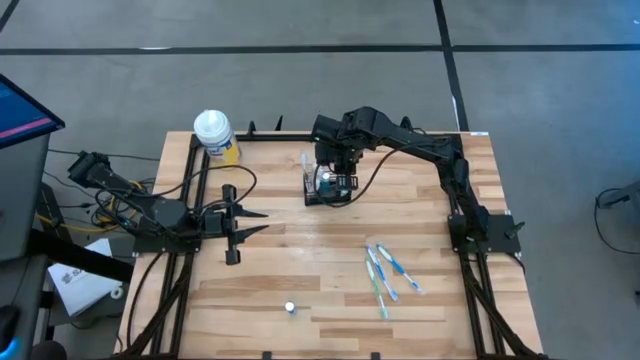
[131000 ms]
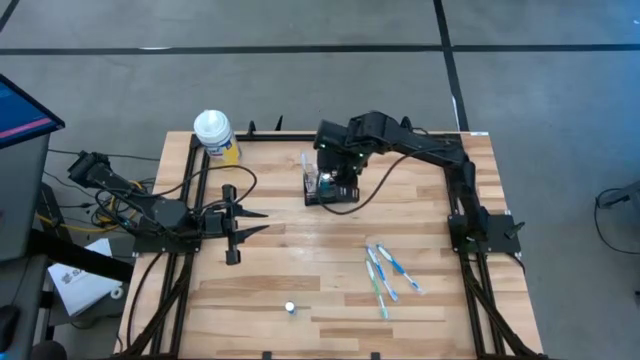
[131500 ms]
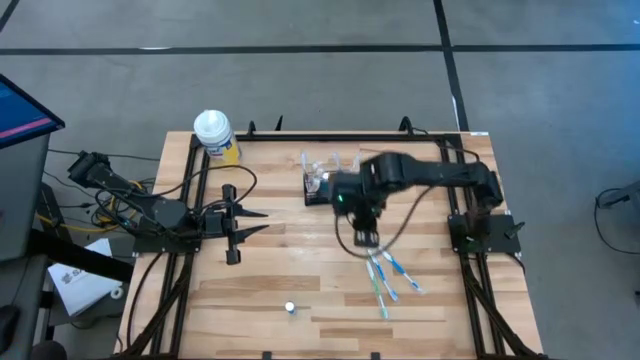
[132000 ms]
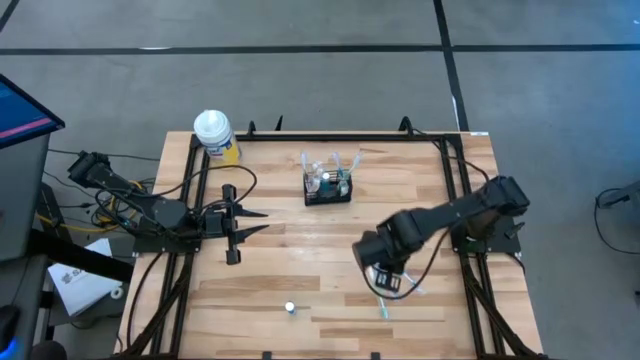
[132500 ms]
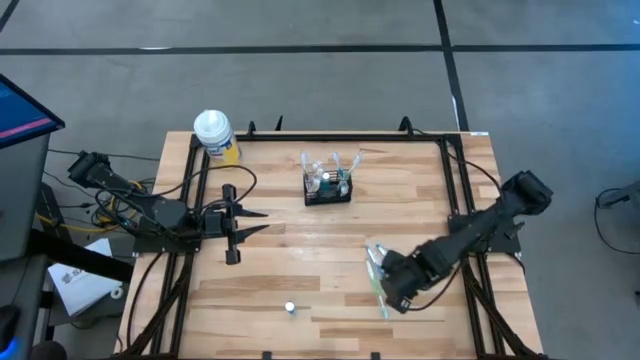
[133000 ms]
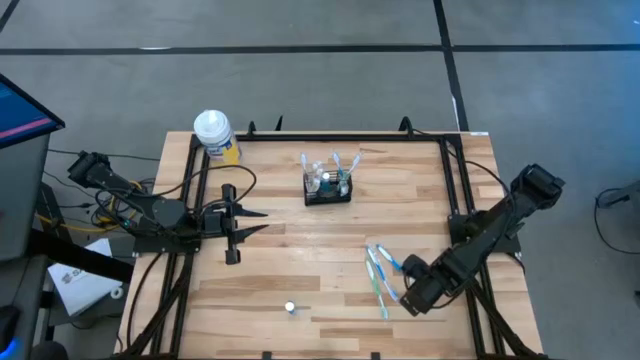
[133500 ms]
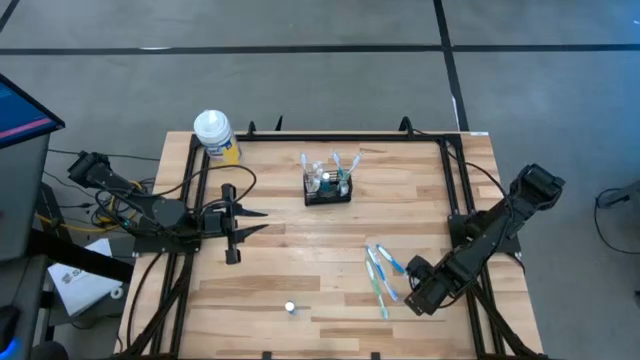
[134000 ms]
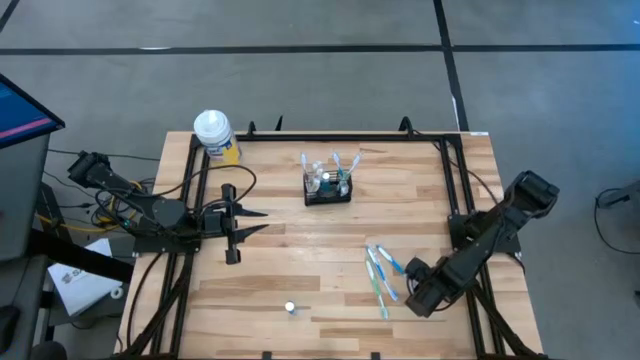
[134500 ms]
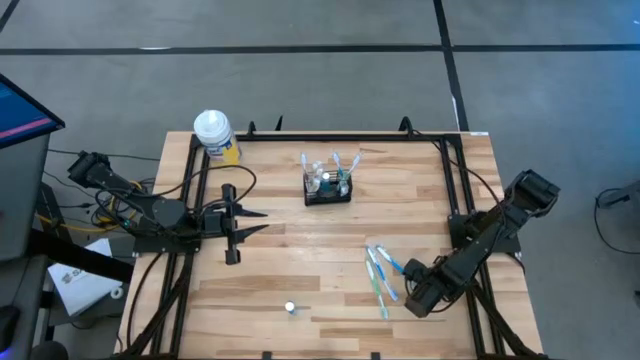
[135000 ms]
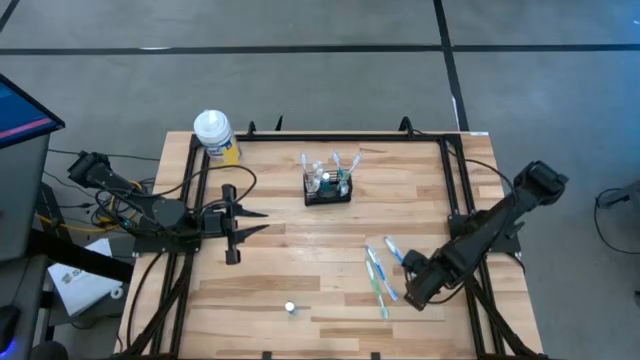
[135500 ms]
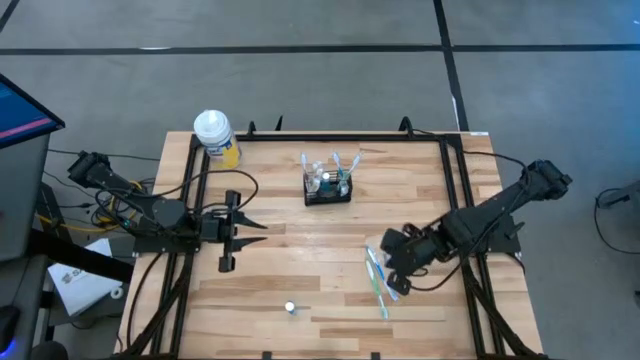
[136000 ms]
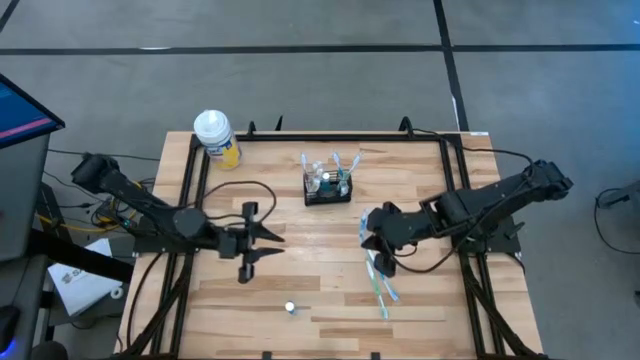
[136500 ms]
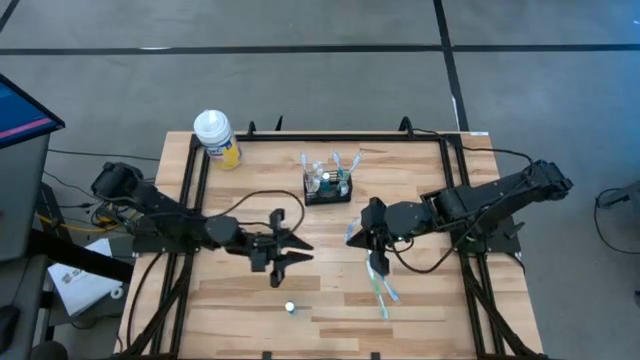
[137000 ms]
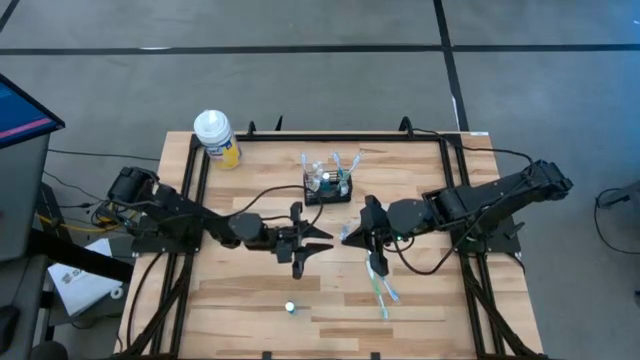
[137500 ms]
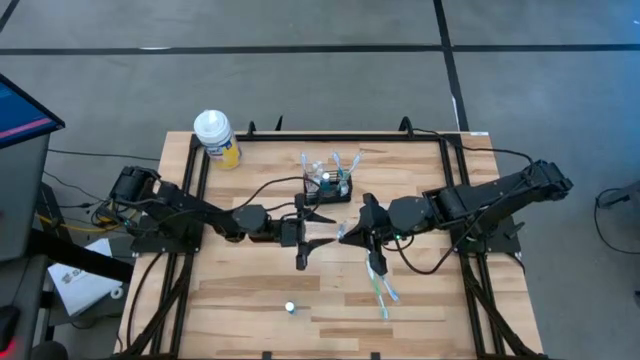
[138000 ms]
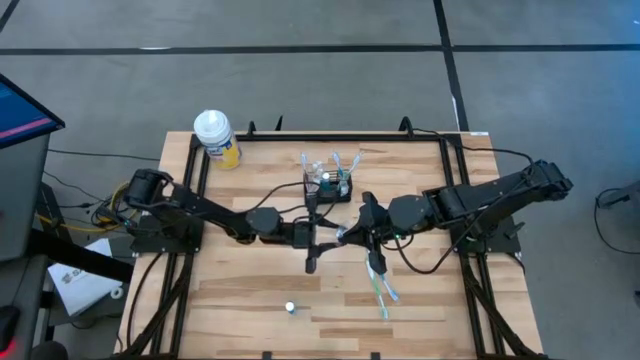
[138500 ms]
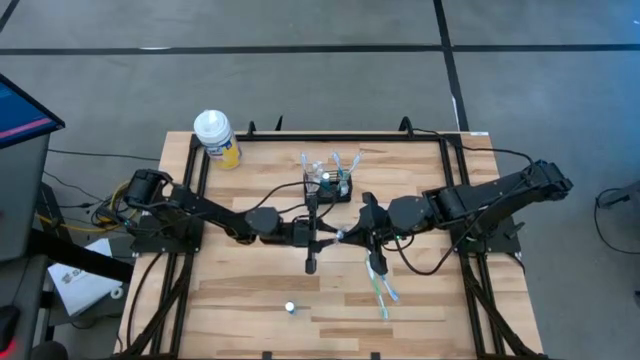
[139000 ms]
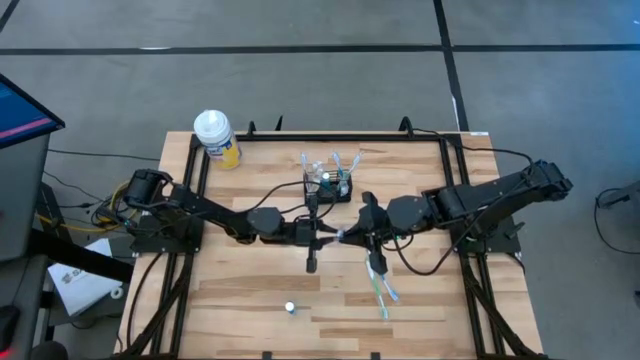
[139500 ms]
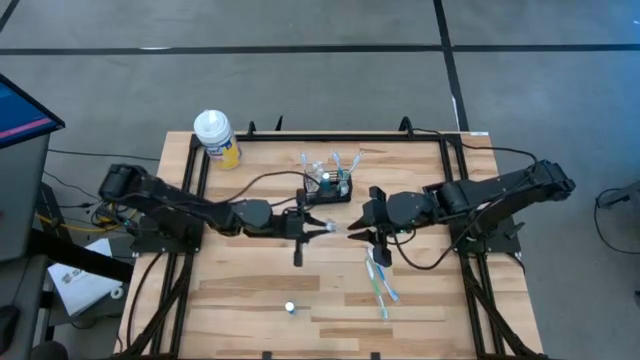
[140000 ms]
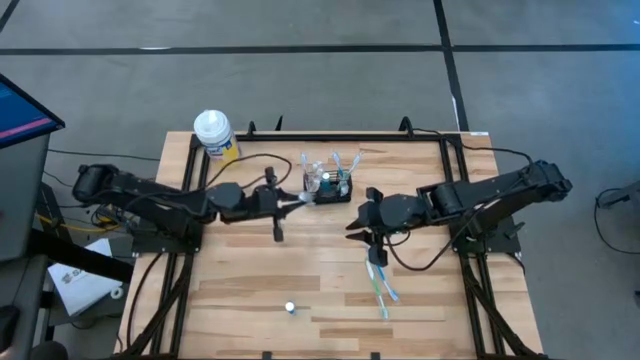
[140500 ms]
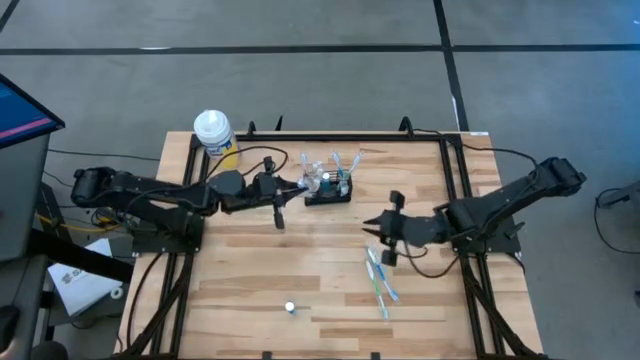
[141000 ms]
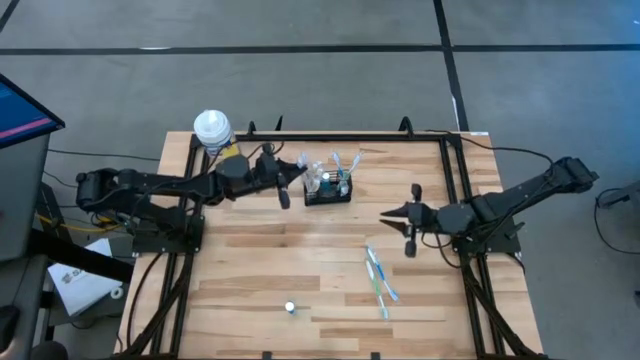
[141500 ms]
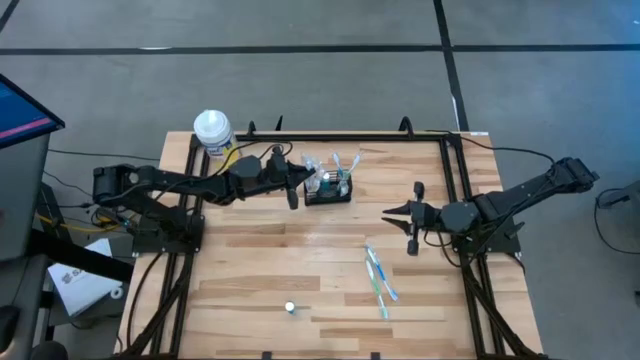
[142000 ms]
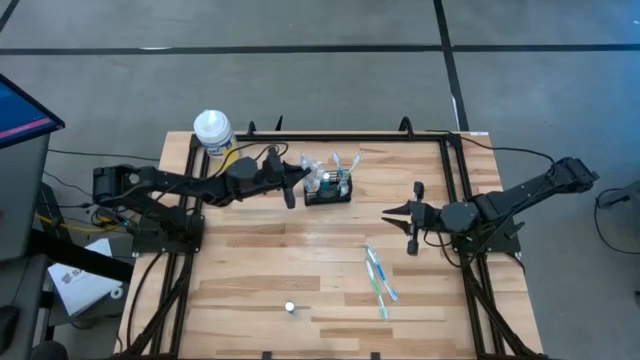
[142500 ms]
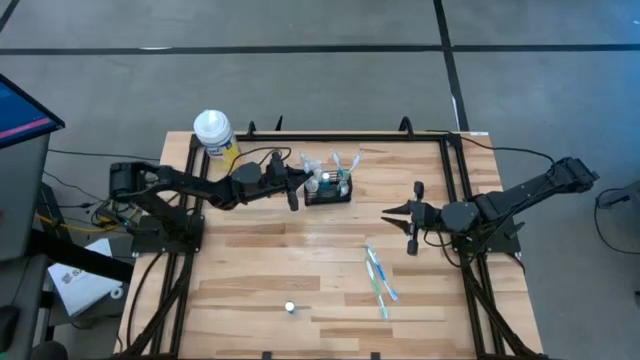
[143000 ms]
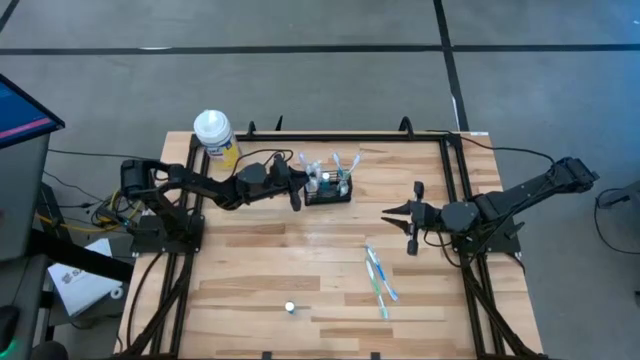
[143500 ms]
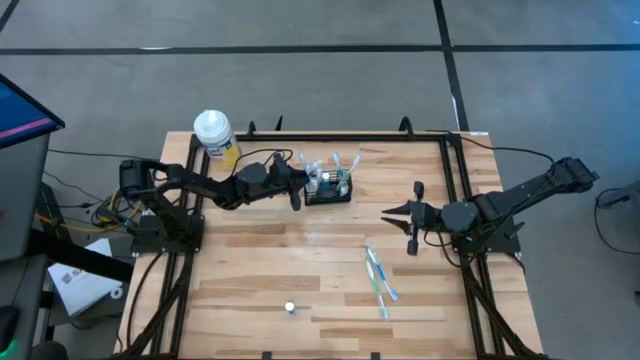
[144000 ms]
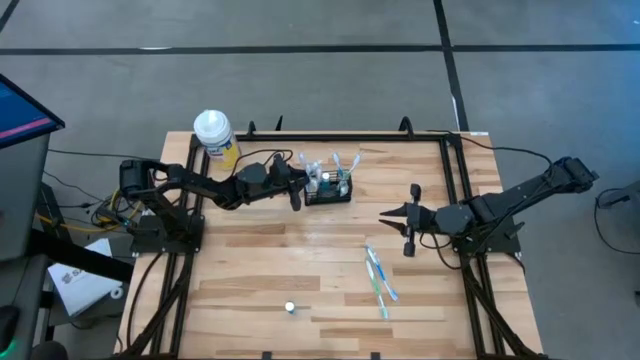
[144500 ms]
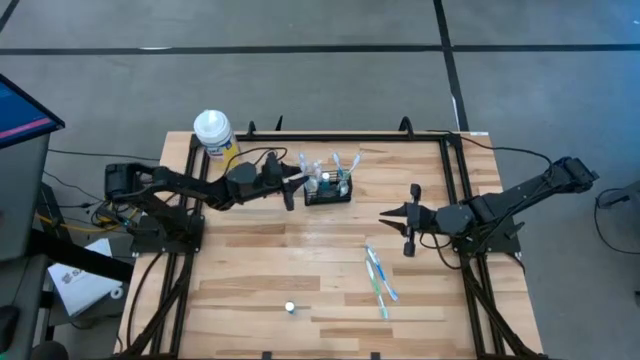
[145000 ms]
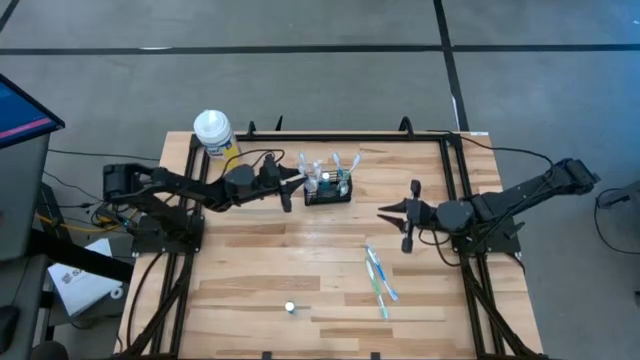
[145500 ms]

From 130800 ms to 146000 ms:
Task: Pick & Place toothbrushing station
Put the blue toothbrush into the black mesh organizer

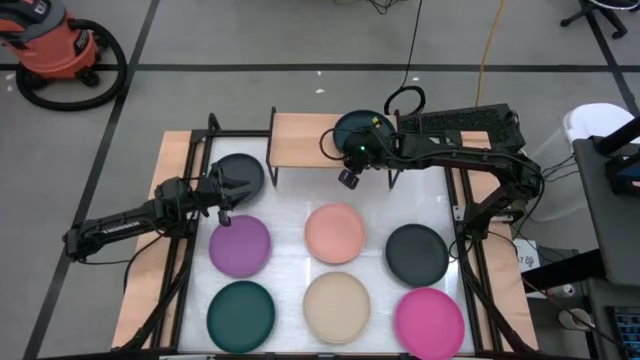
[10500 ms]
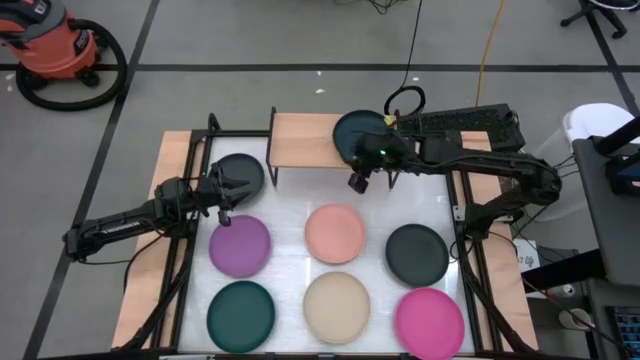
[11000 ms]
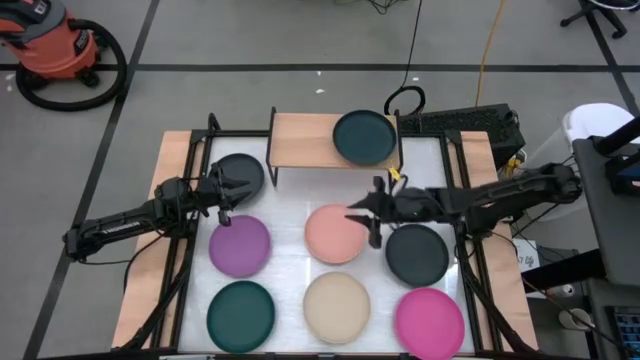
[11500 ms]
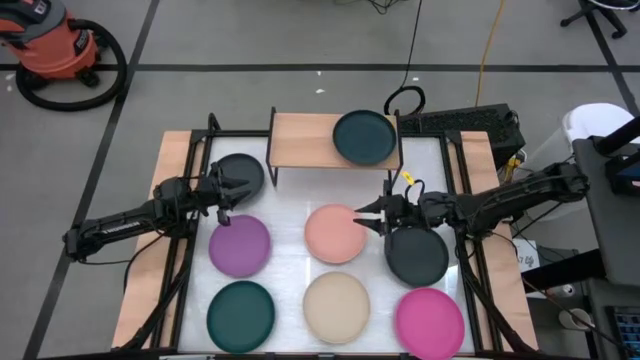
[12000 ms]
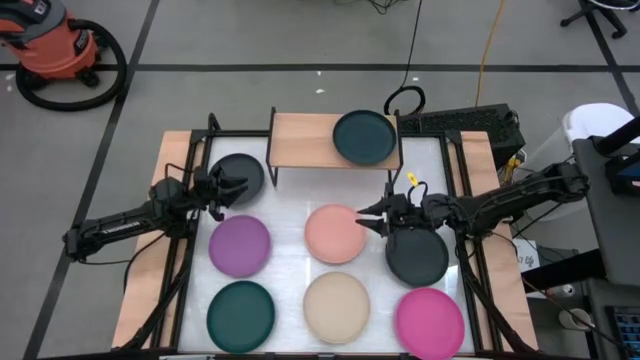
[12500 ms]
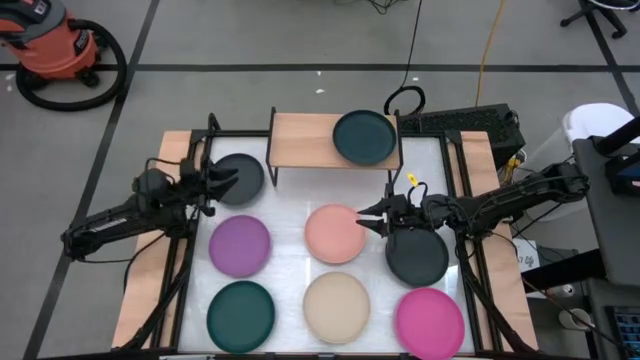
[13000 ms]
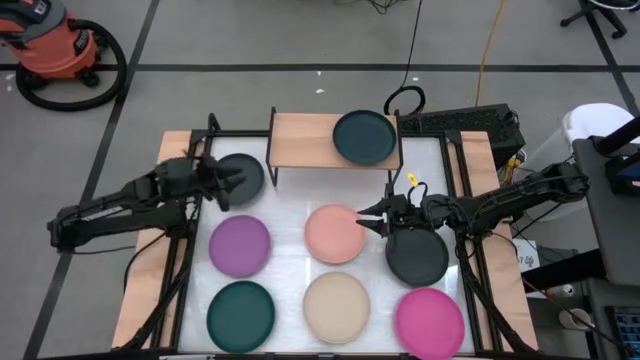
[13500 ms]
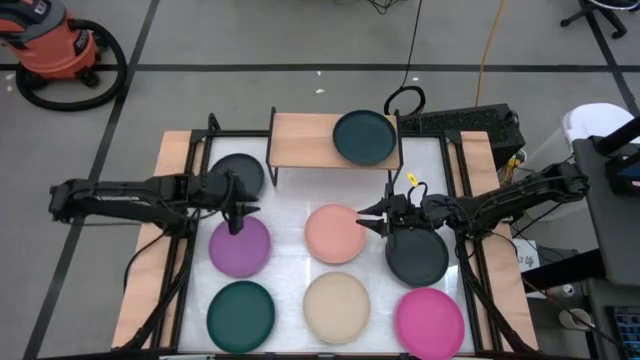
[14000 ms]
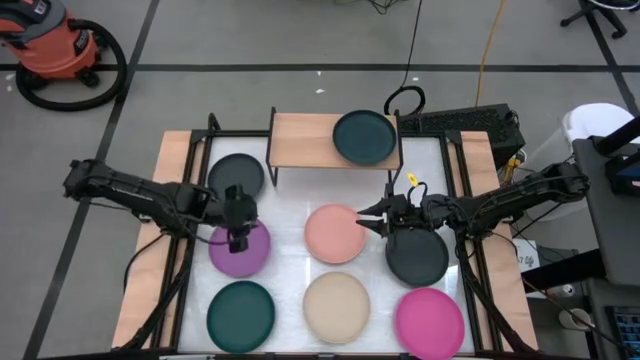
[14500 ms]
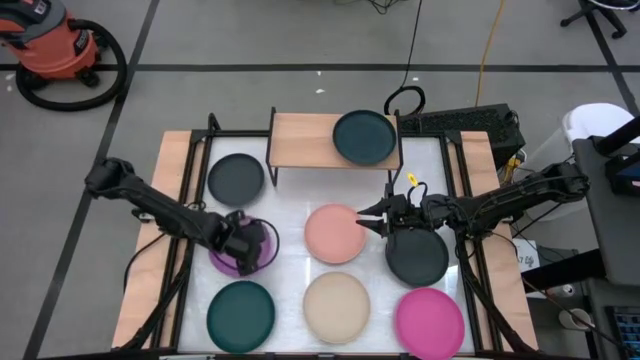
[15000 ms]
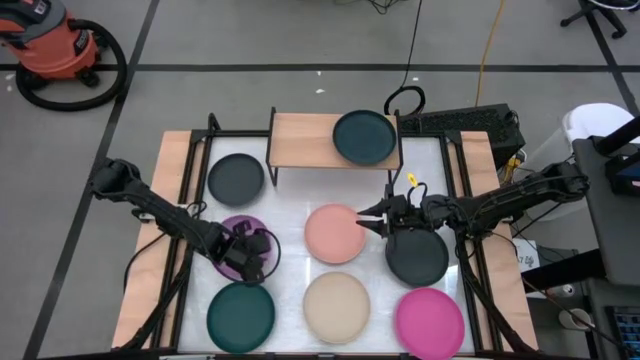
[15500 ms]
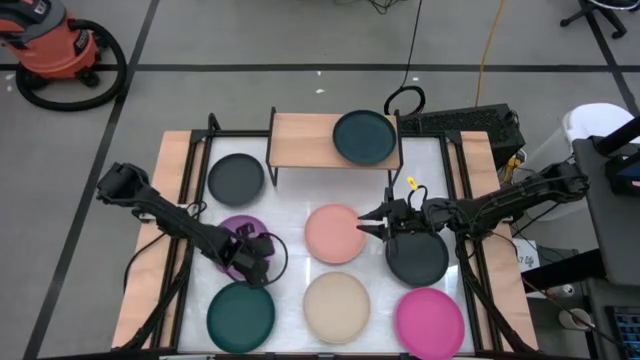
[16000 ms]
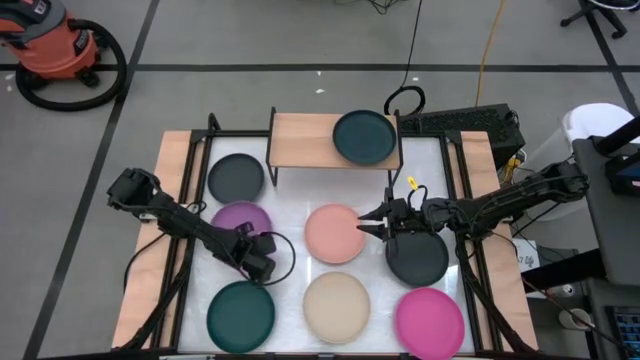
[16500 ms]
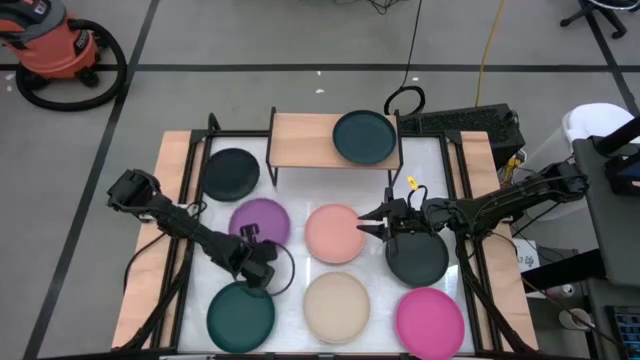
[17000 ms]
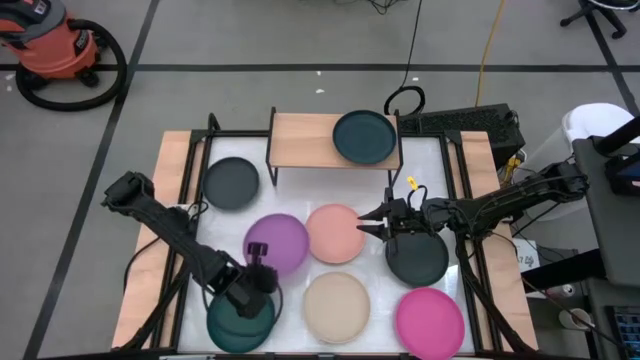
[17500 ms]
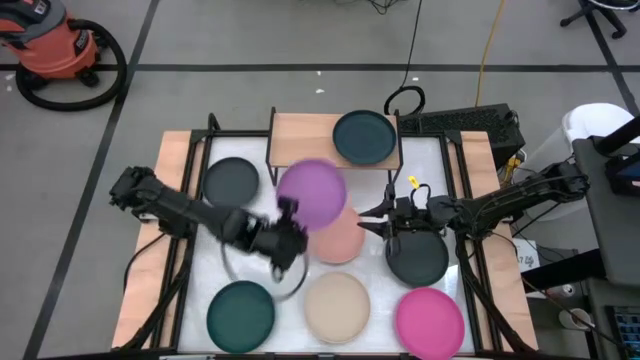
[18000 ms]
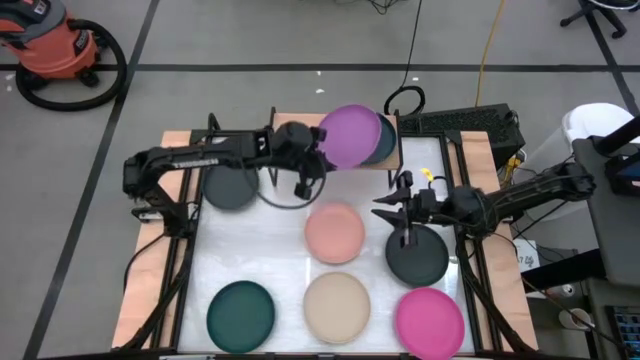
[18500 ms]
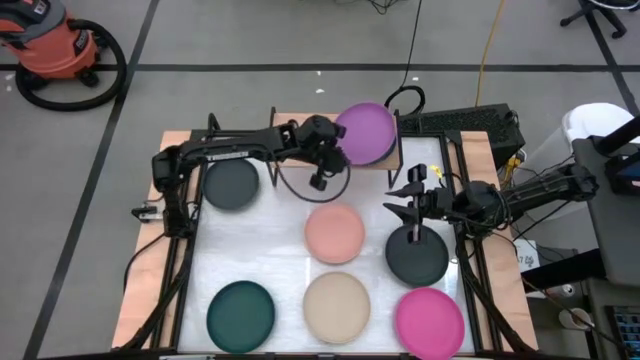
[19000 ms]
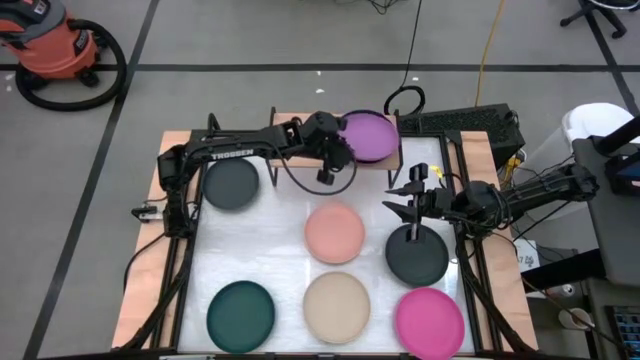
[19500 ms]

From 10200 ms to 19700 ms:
Task: Place and stack plates onto a shelf
Stack the violet plate on top of the dark blue plate on the shelf
